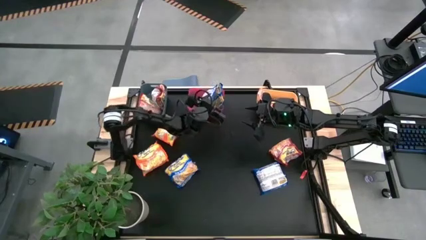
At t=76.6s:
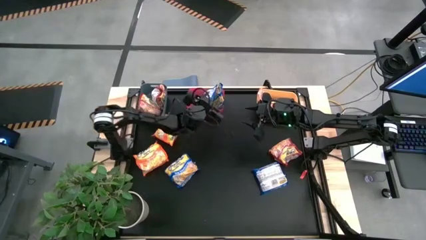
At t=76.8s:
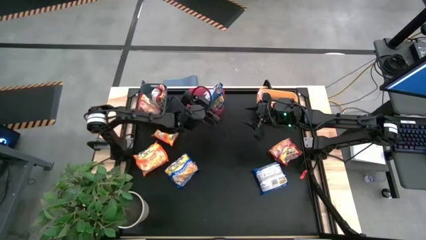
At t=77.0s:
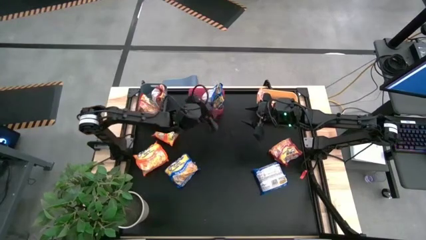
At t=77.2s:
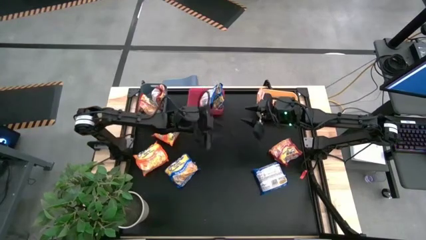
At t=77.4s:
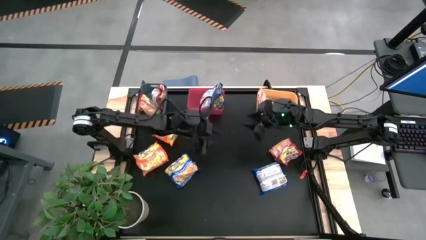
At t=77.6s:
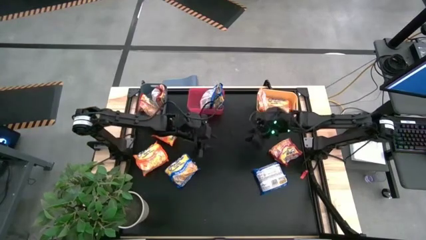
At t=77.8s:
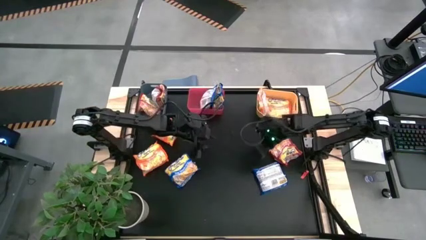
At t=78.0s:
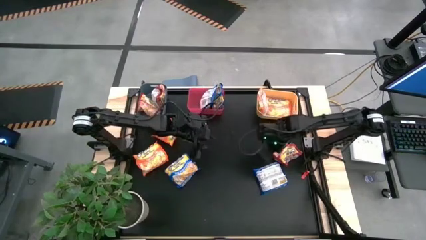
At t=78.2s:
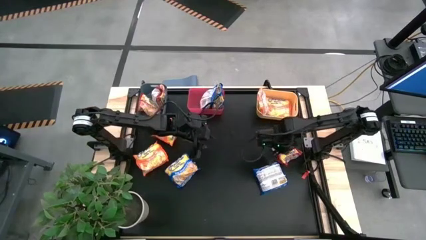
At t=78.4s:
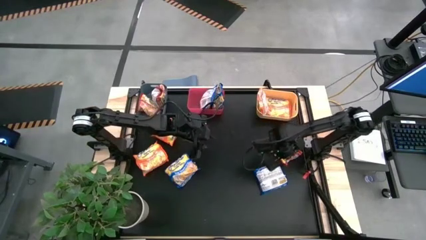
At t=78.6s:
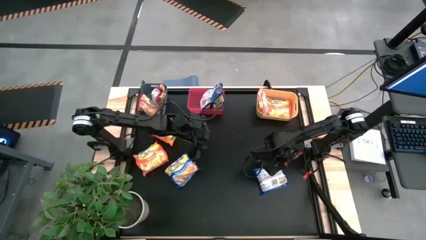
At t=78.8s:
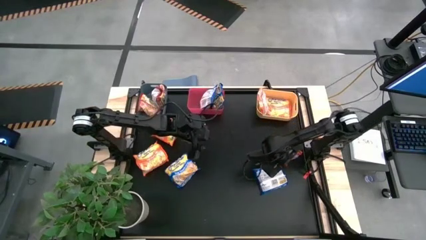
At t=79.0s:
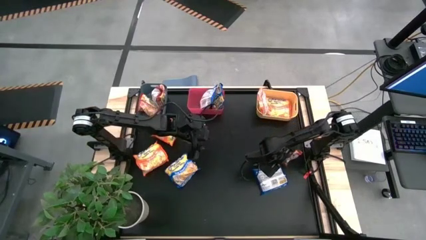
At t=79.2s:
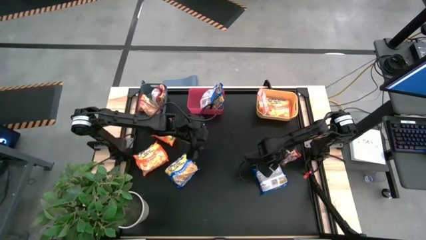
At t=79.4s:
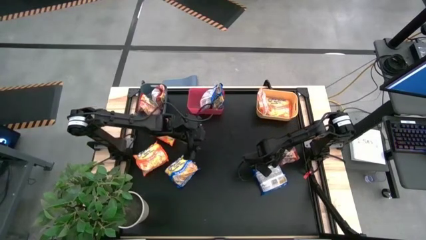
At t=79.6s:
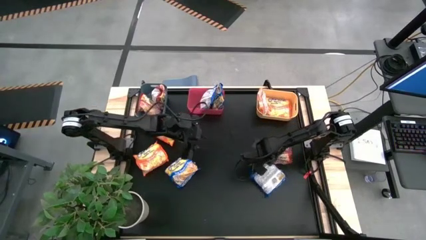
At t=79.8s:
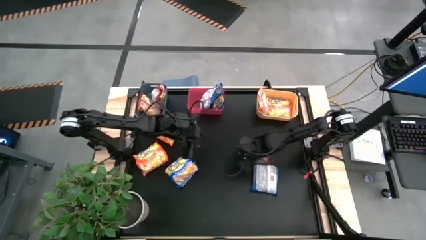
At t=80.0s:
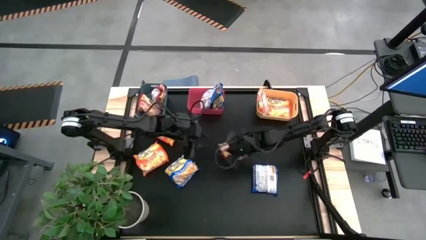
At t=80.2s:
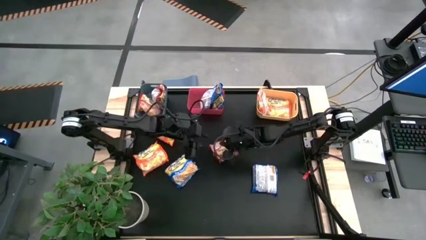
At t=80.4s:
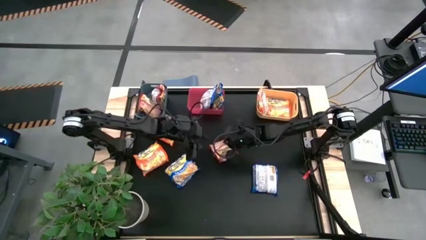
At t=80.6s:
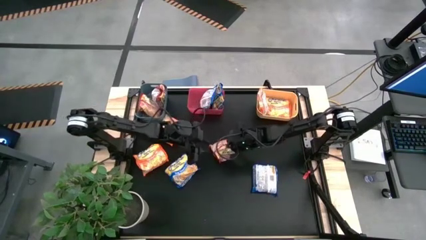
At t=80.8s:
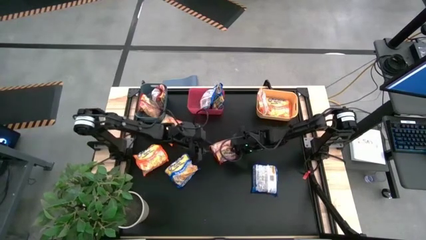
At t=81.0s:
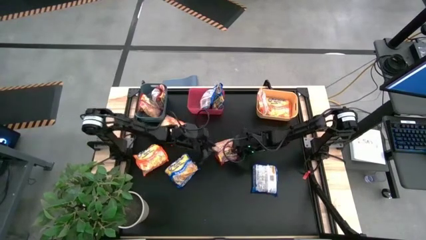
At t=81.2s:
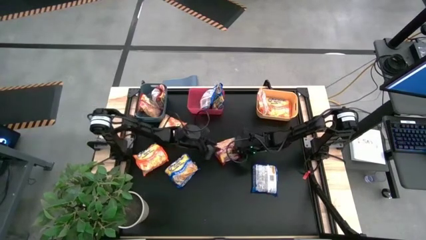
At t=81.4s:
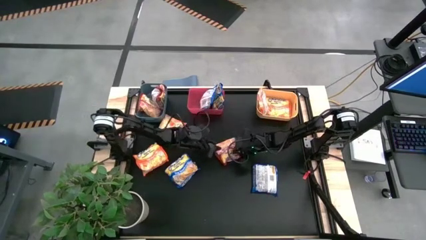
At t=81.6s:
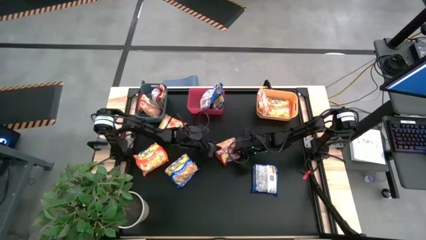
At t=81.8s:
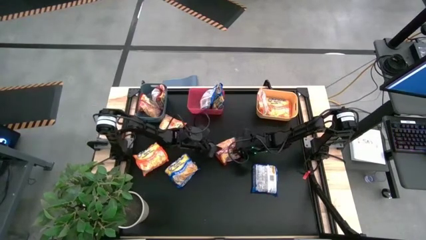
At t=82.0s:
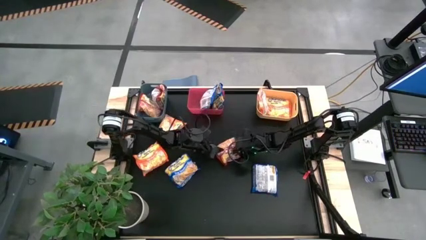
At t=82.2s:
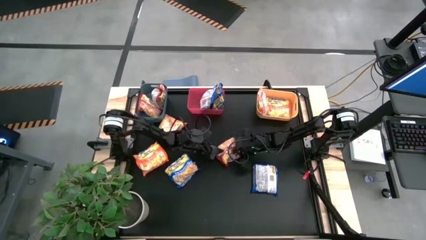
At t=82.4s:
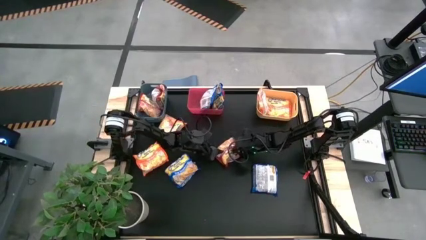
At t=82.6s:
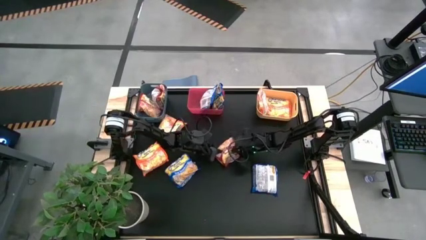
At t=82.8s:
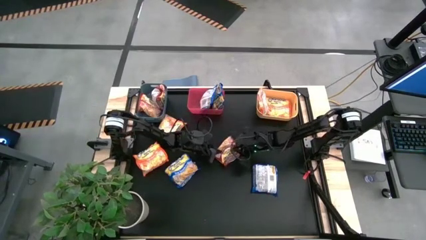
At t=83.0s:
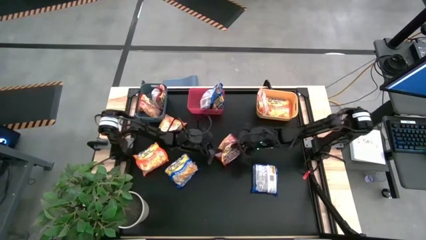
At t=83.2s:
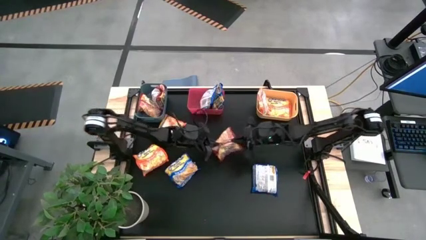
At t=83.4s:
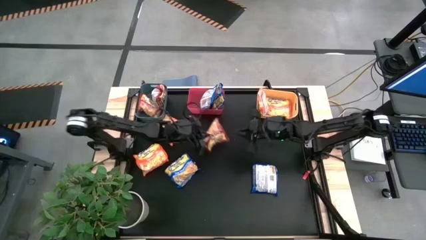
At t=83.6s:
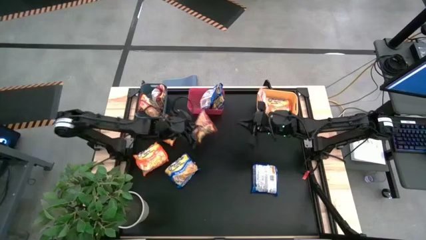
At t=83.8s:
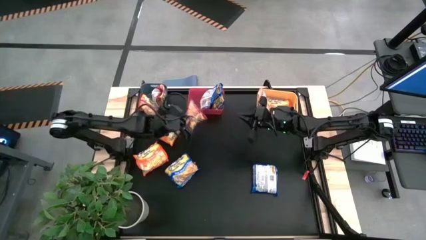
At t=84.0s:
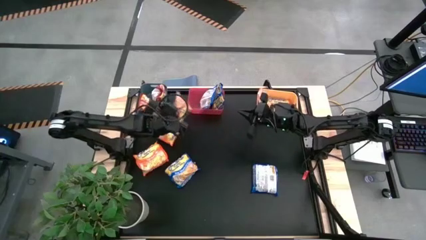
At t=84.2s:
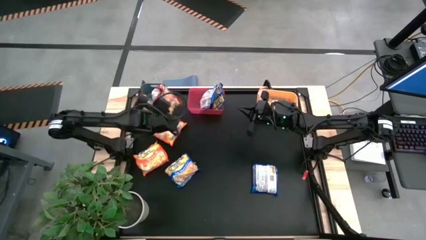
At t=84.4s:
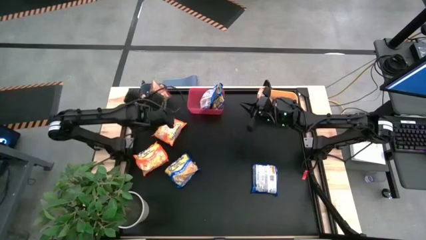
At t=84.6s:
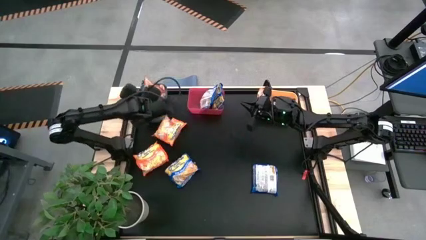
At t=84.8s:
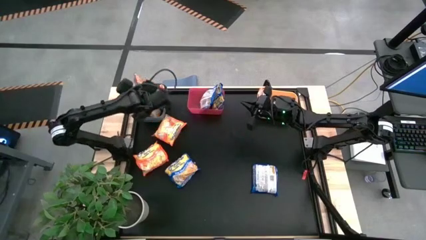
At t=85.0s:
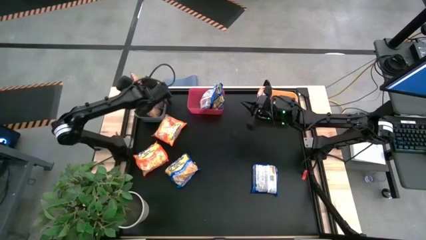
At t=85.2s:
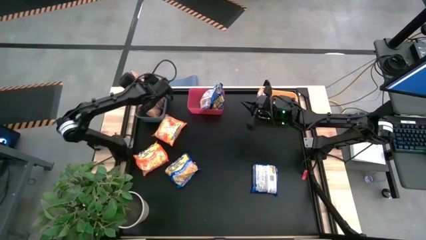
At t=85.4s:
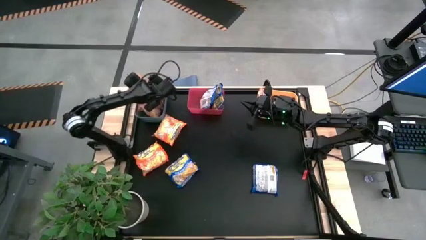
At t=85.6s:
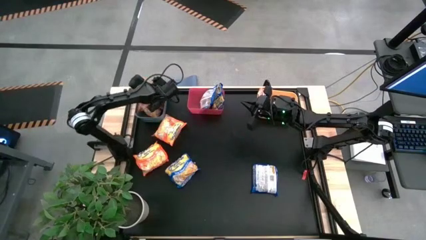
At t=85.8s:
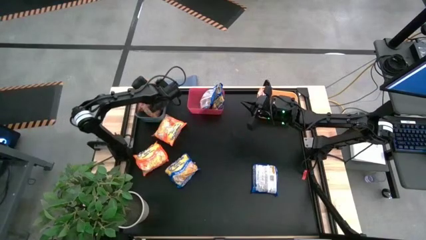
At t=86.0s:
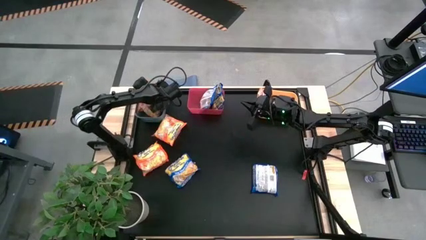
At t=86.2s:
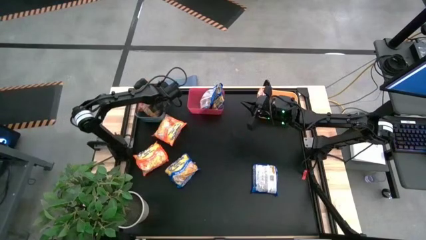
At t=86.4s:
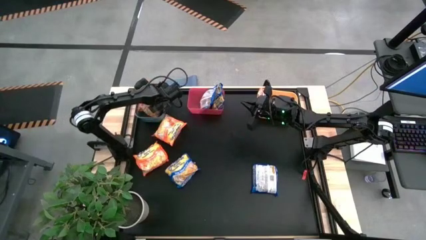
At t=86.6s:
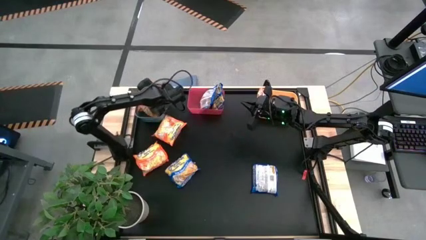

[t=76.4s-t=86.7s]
Task: Sort Maruchan noodles
Put the red noodle pack into the gray bin

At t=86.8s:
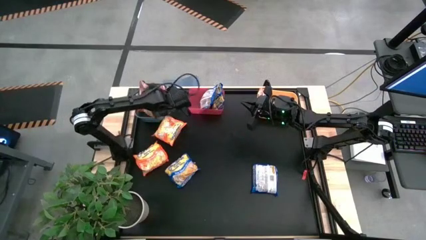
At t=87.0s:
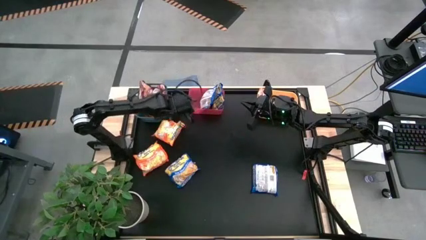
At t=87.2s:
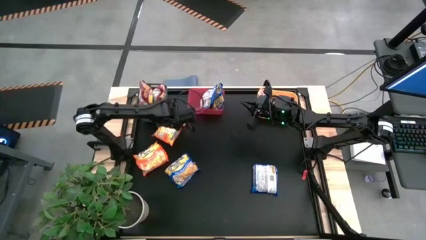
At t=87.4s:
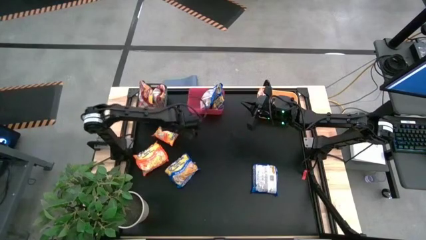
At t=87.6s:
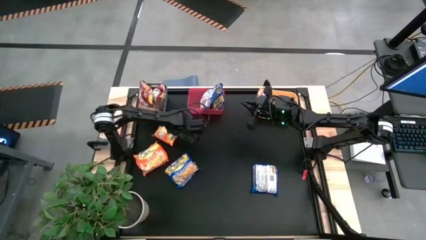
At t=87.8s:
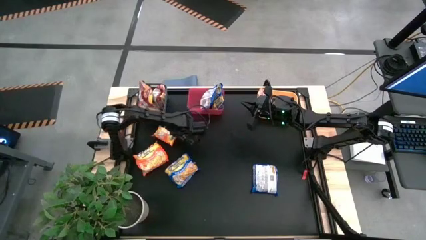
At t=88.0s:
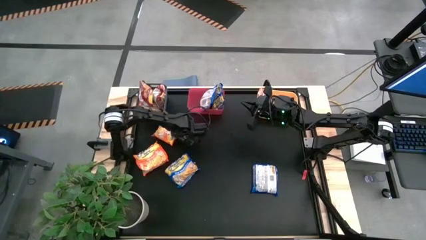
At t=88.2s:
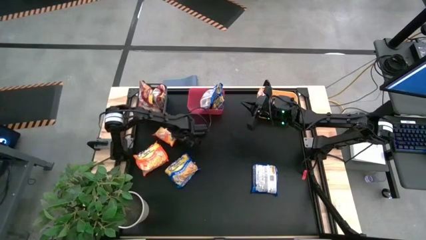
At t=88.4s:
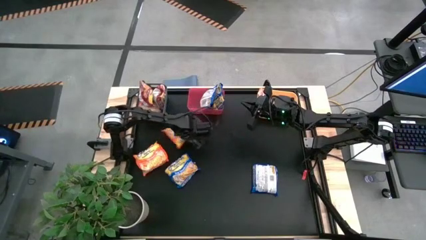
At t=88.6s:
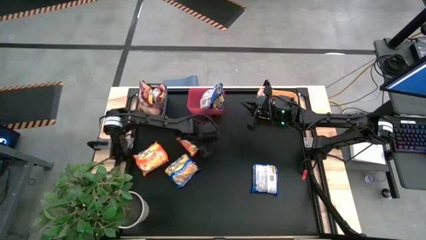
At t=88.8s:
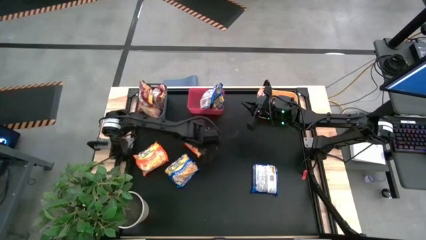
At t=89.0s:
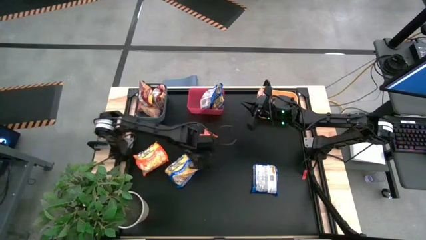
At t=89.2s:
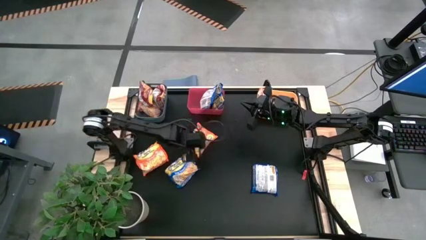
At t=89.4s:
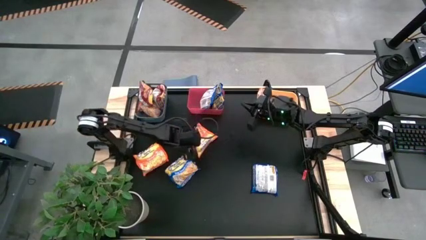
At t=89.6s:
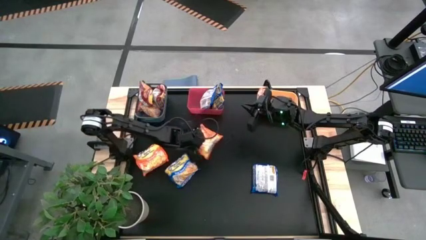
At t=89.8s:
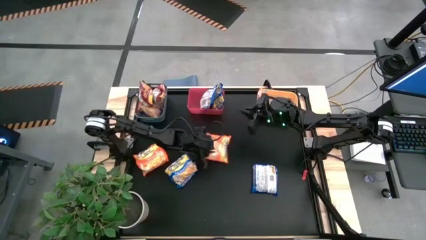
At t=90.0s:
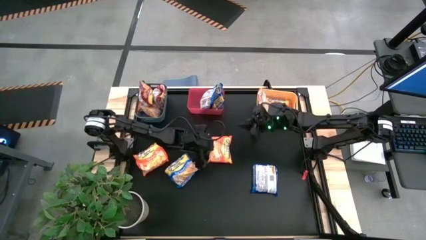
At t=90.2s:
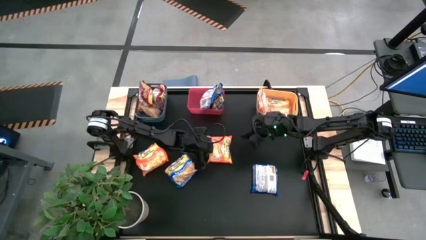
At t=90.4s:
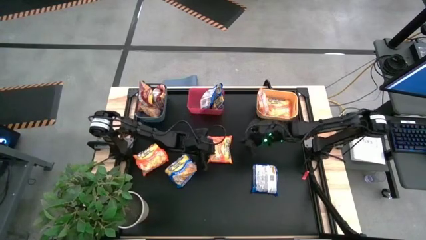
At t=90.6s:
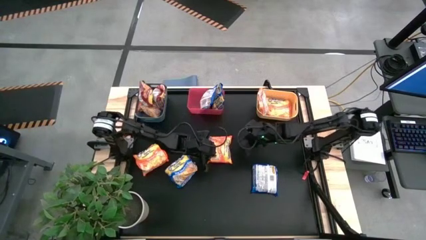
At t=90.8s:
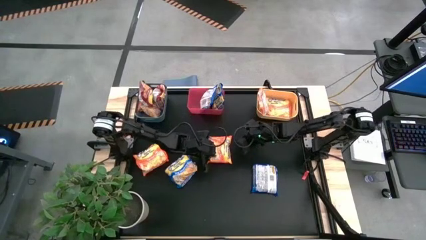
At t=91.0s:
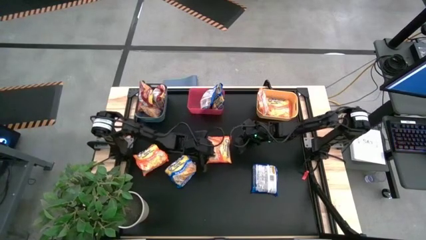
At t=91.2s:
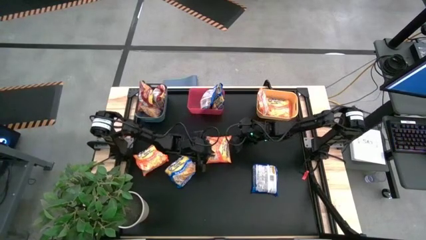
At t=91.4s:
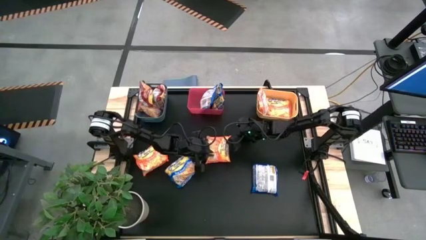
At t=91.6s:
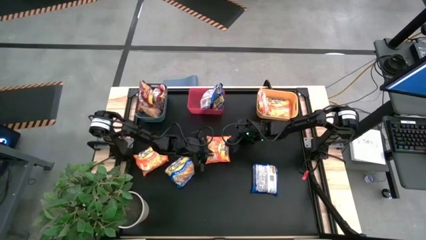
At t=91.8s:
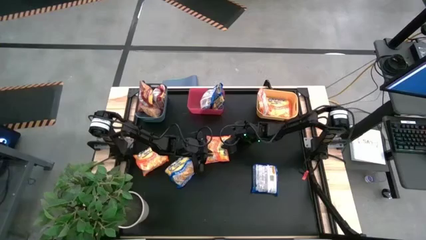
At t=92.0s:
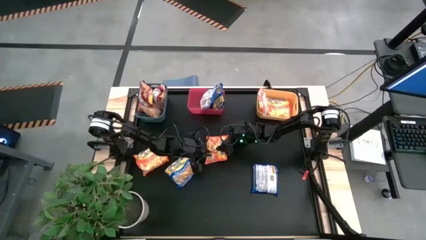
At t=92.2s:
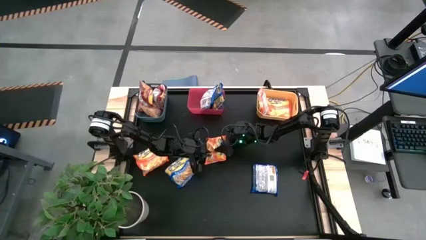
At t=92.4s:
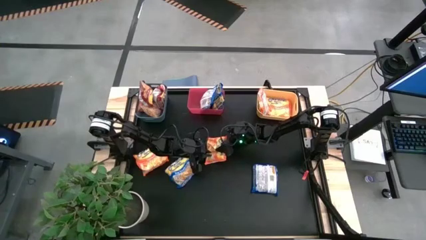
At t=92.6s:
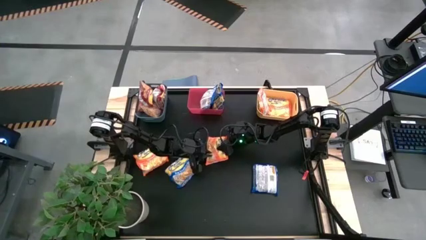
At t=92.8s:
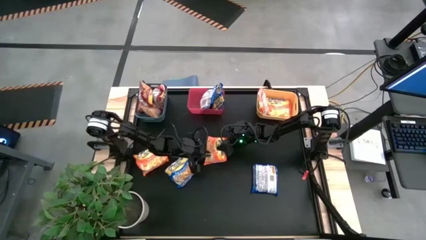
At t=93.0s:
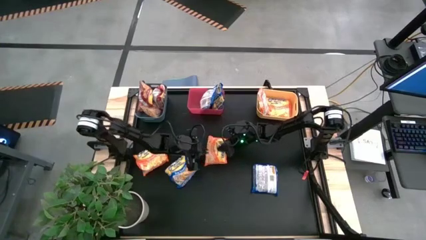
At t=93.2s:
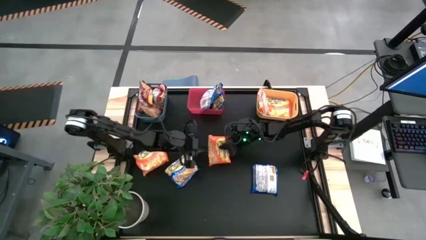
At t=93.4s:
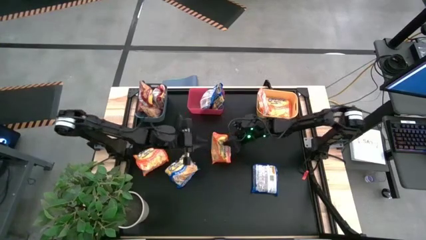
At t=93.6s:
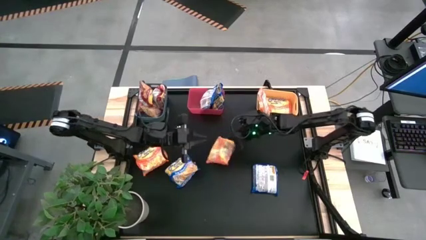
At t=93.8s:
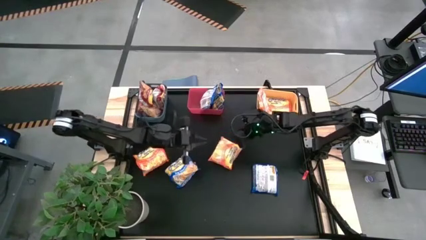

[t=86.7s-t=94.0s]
Put the orange noodle pack into the yellow bin
